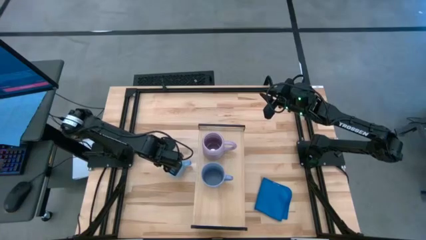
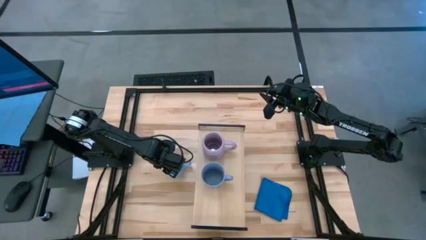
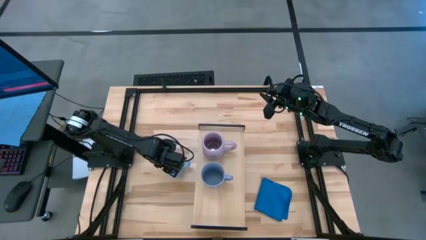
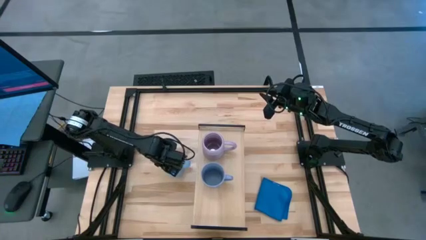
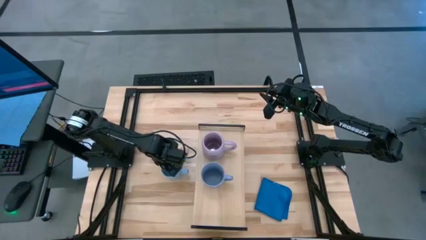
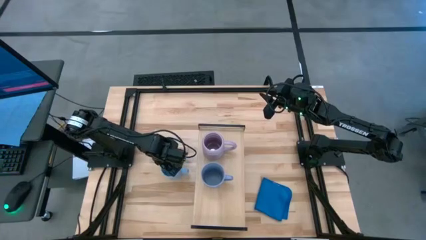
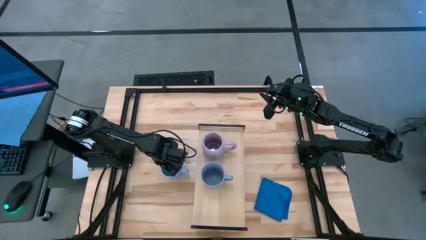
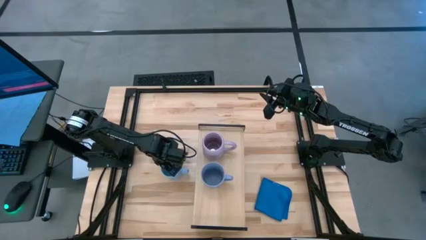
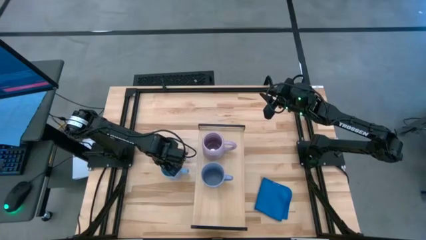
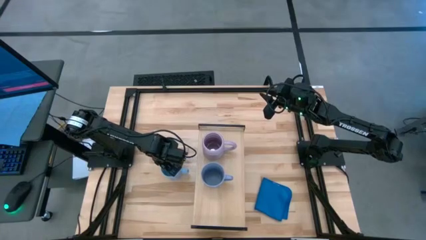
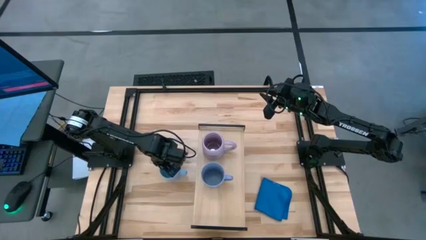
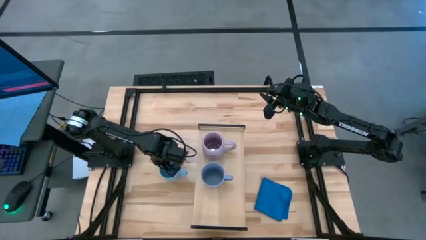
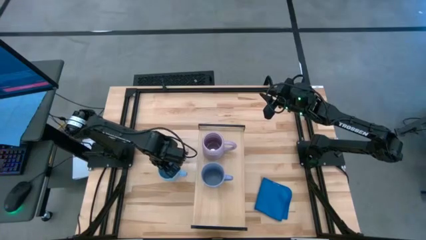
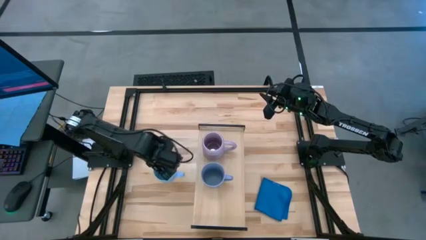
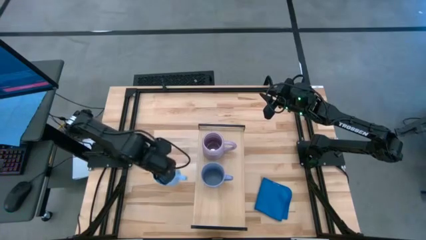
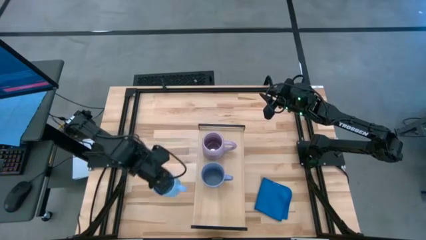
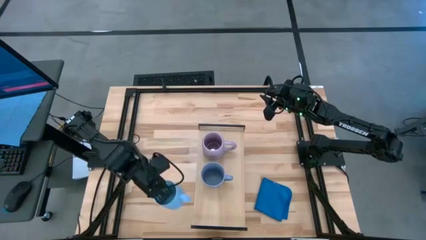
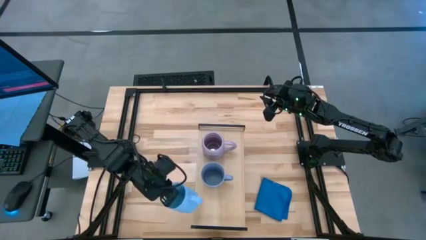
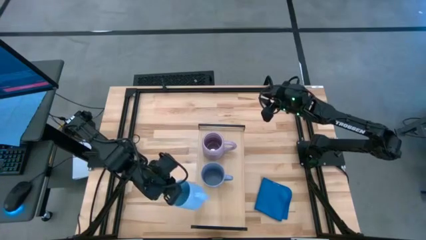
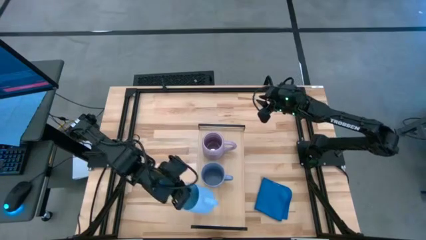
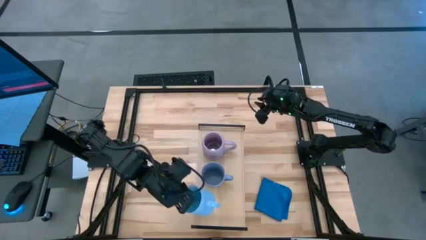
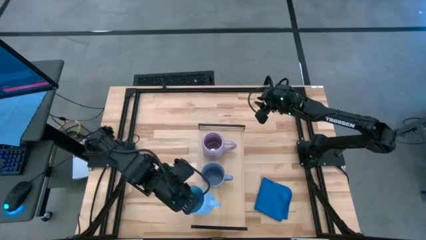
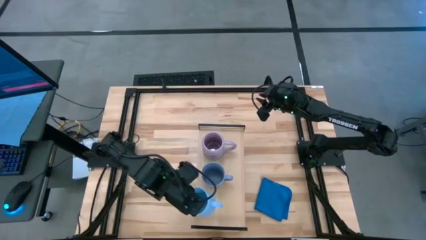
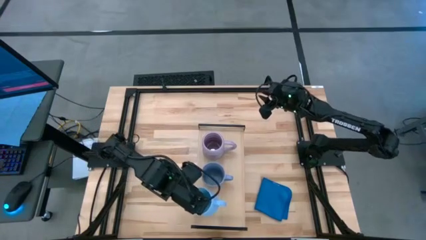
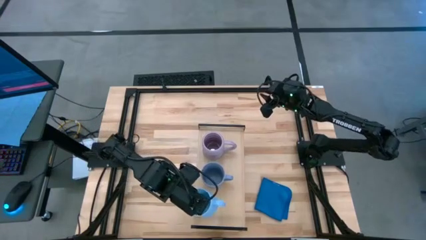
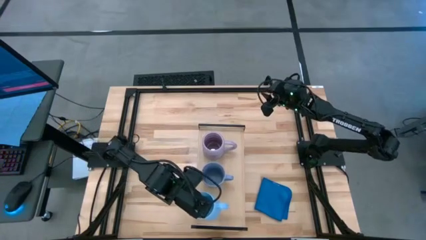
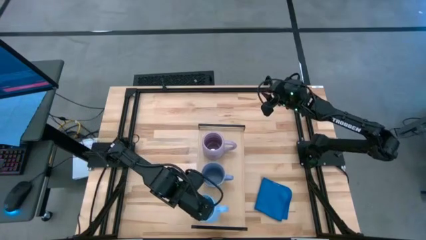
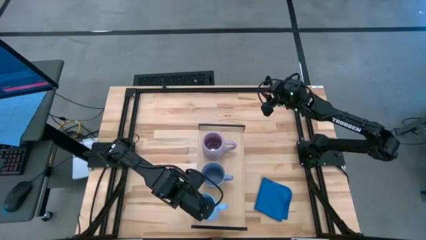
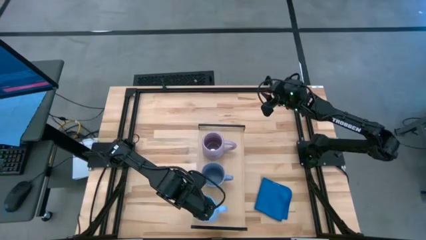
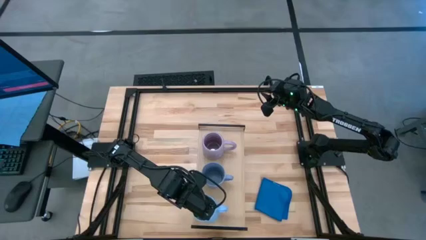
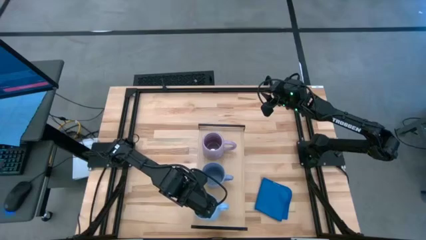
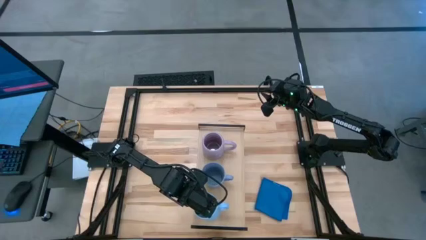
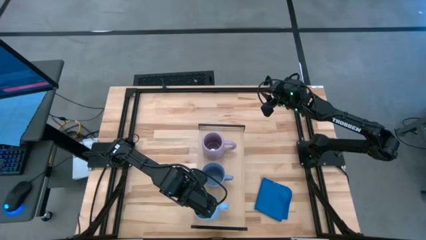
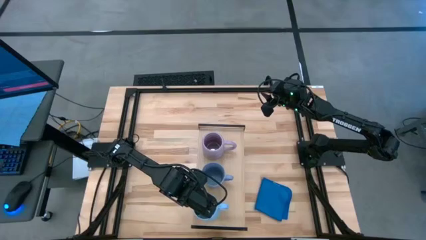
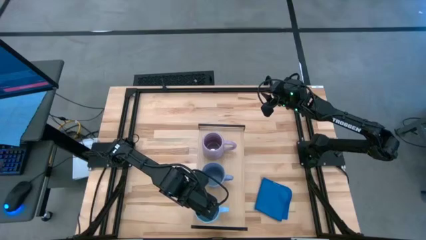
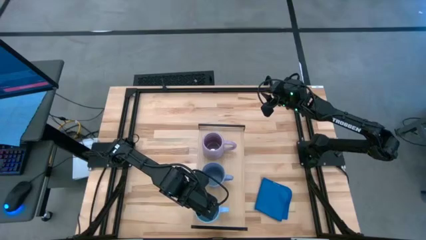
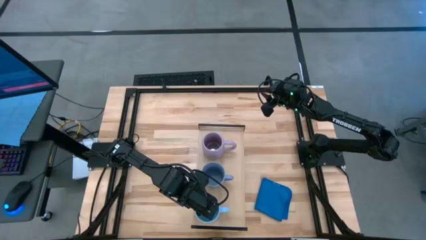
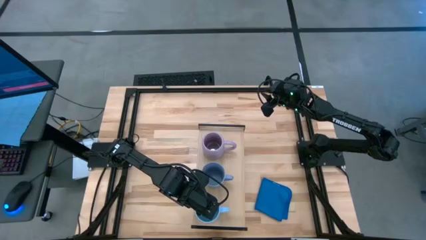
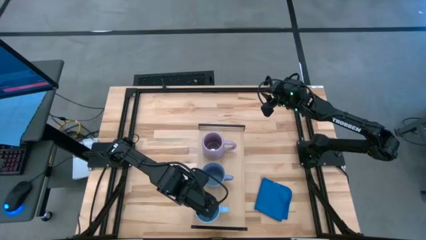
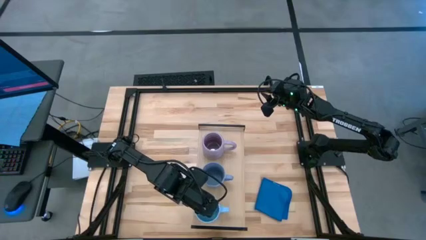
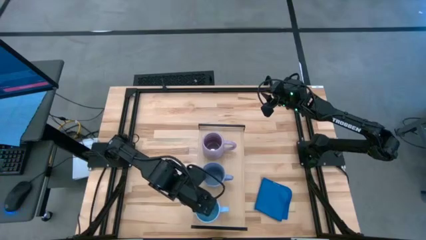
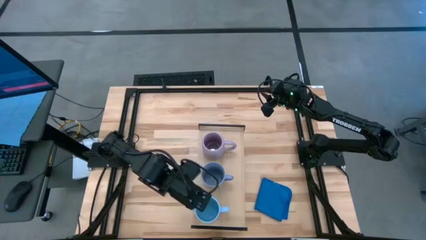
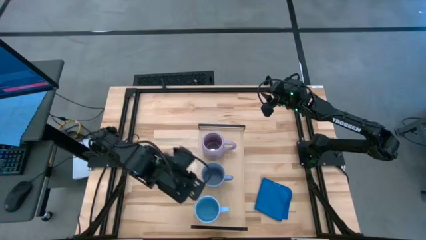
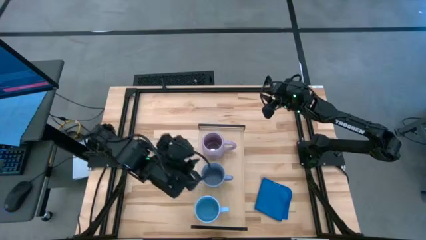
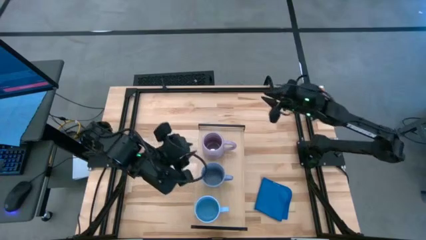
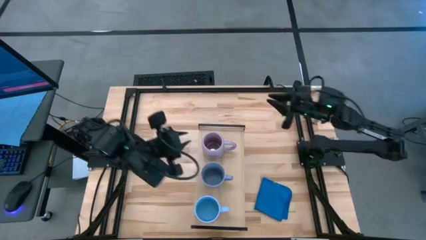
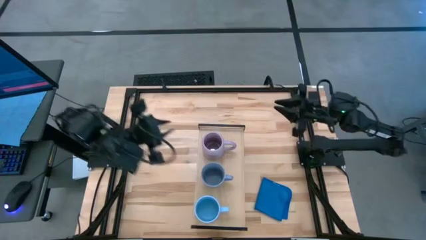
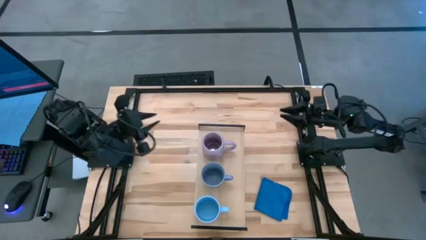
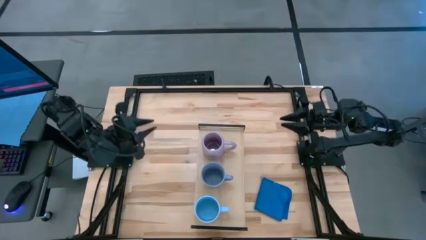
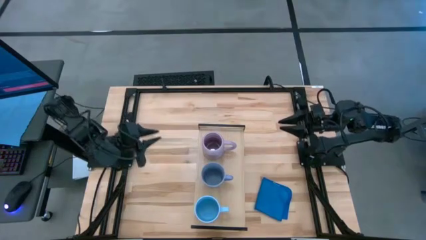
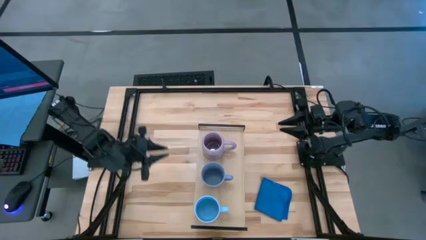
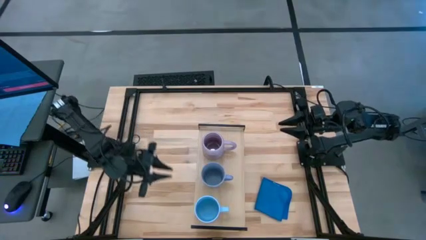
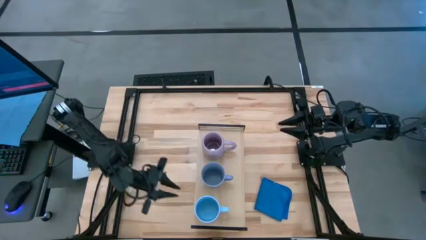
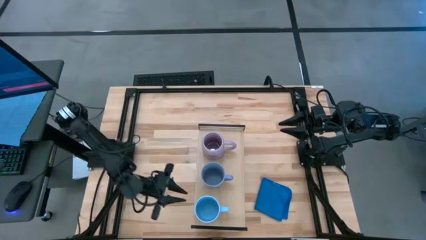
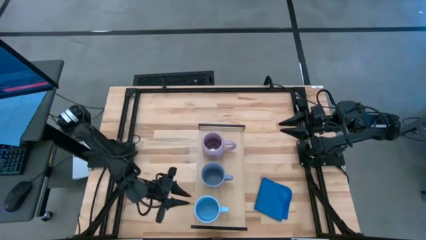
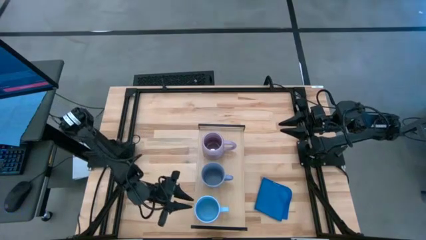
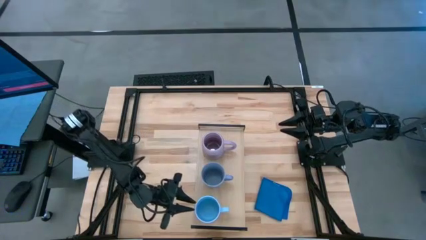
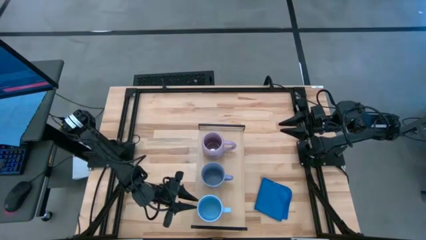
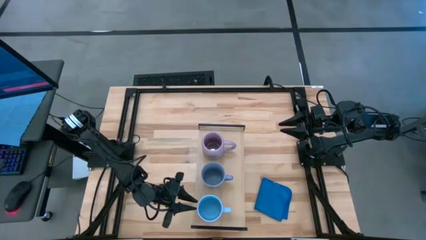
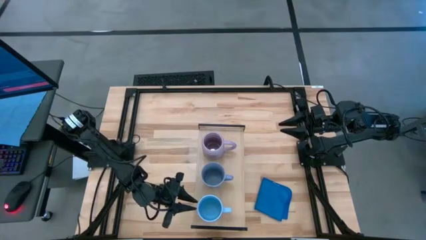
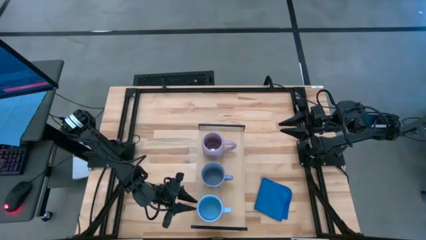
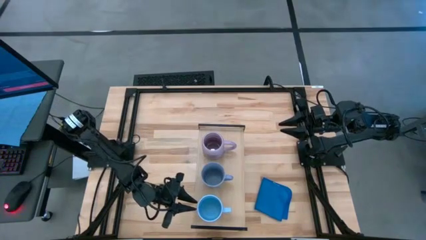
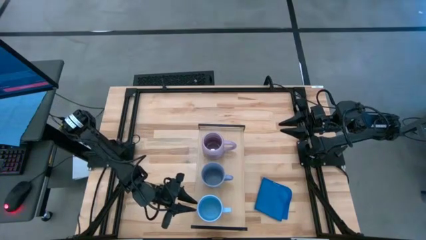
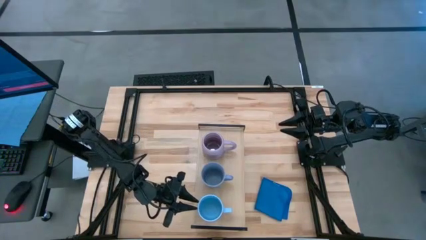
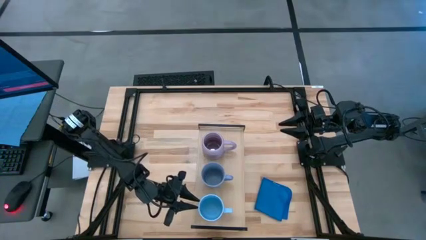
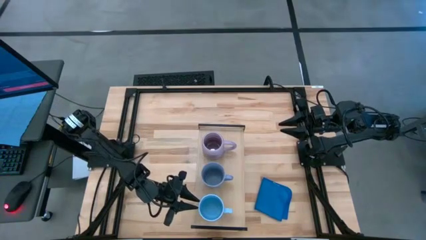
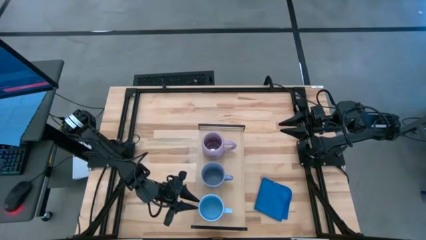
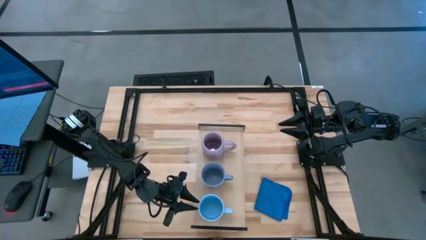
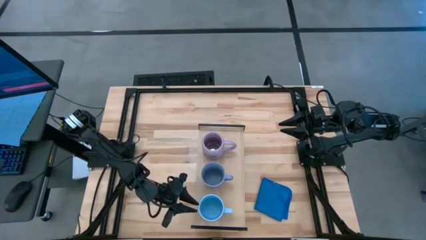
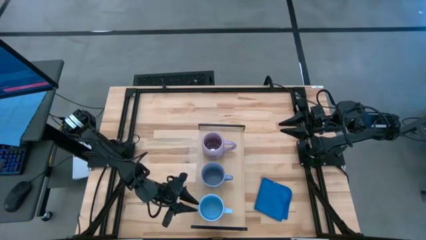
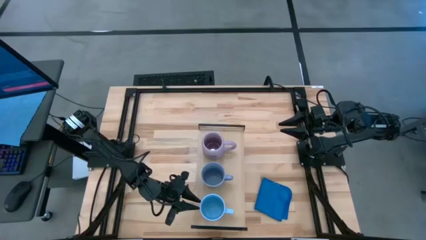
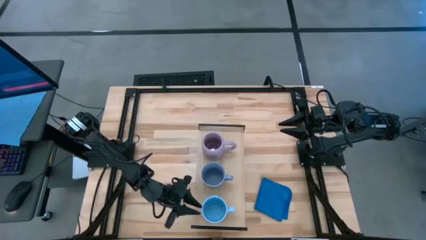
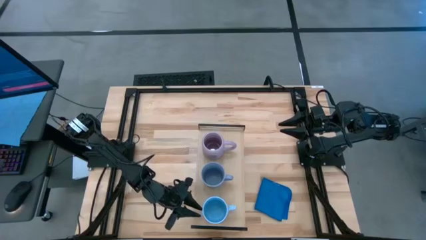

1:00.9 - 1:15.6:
Task: Stack small to large cups/mugs on shelf
Put the light blue mug on the shelf
